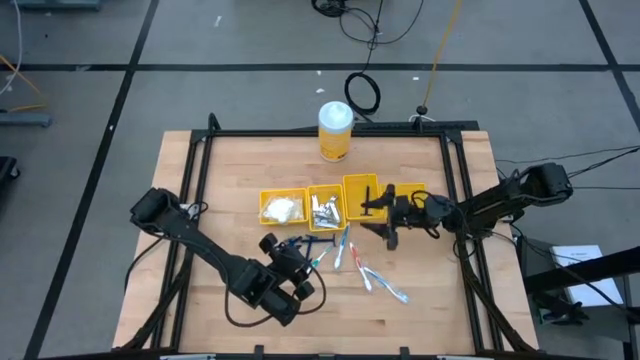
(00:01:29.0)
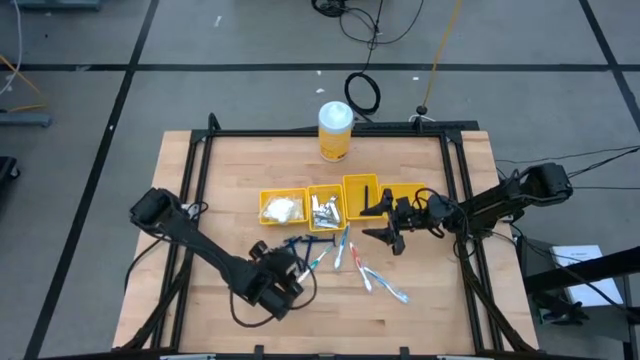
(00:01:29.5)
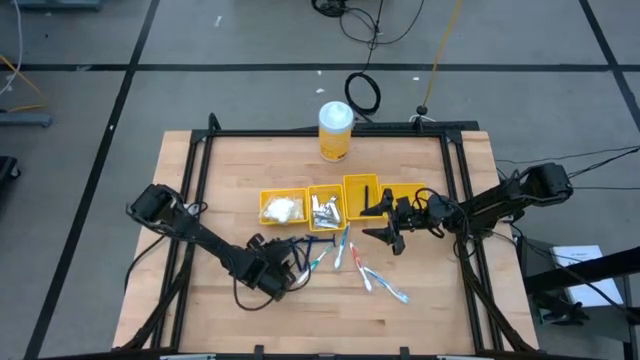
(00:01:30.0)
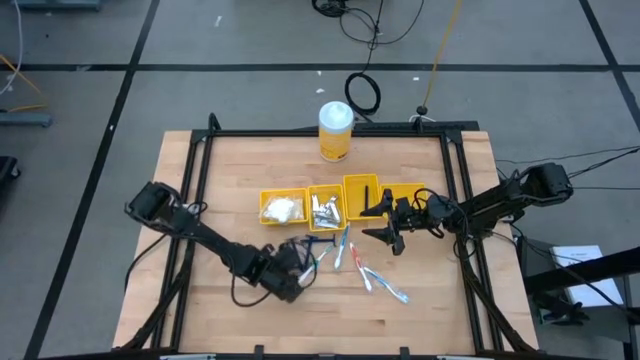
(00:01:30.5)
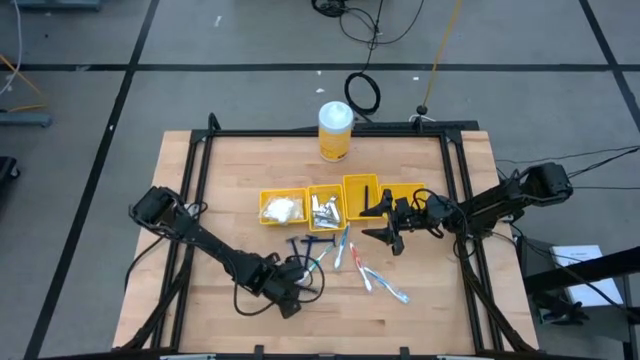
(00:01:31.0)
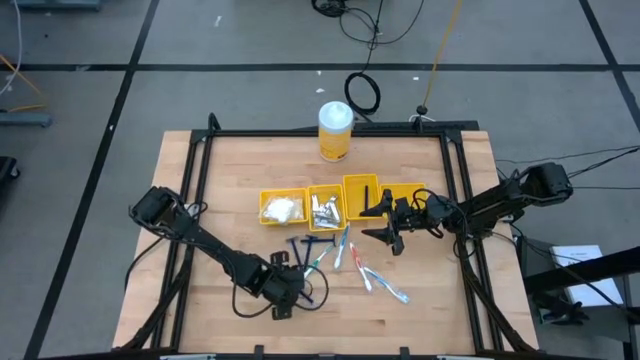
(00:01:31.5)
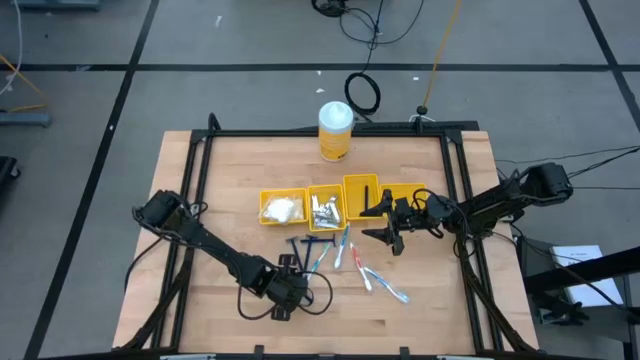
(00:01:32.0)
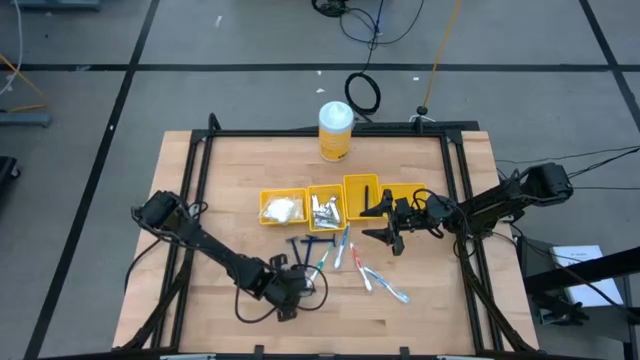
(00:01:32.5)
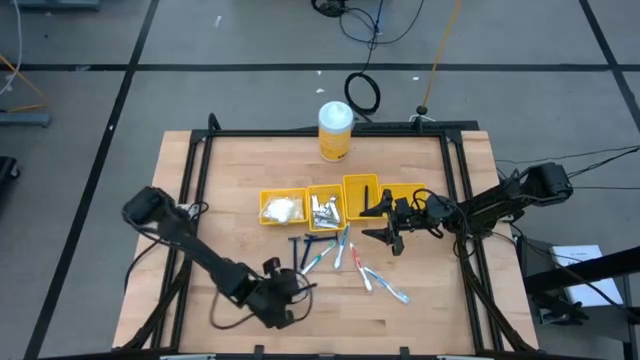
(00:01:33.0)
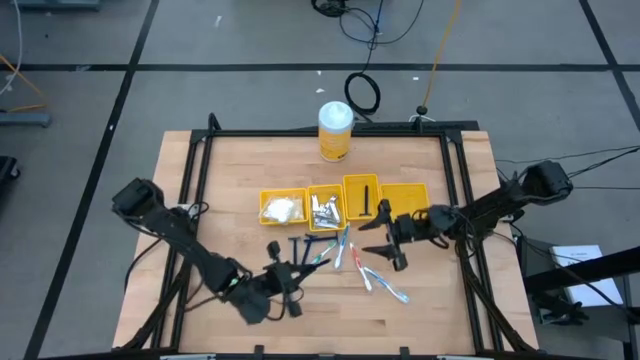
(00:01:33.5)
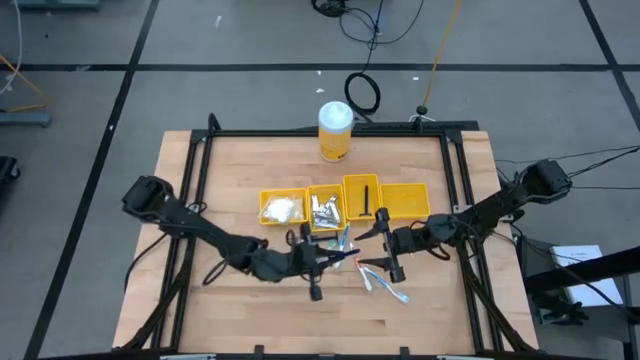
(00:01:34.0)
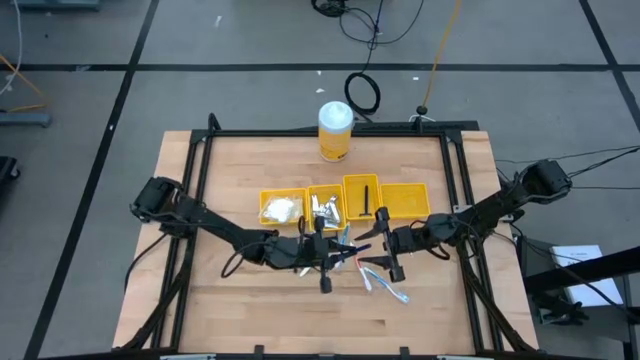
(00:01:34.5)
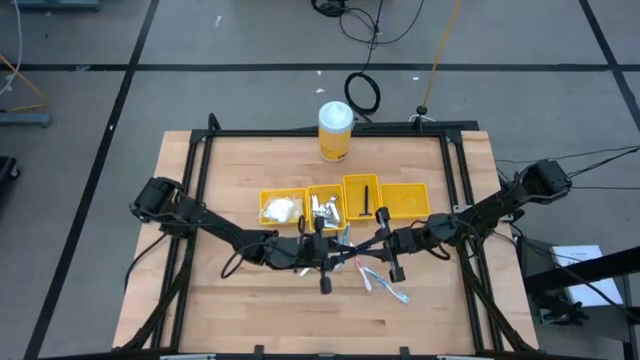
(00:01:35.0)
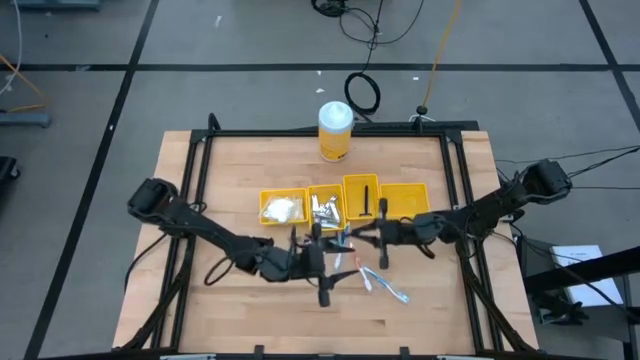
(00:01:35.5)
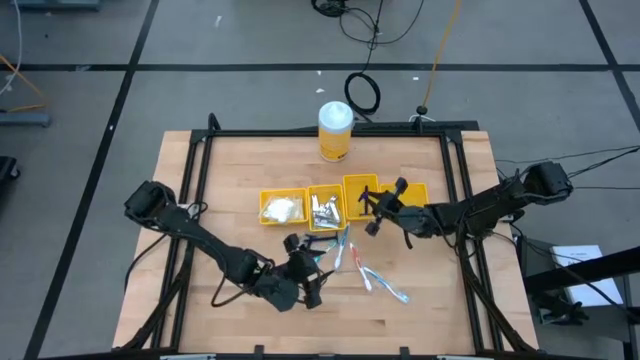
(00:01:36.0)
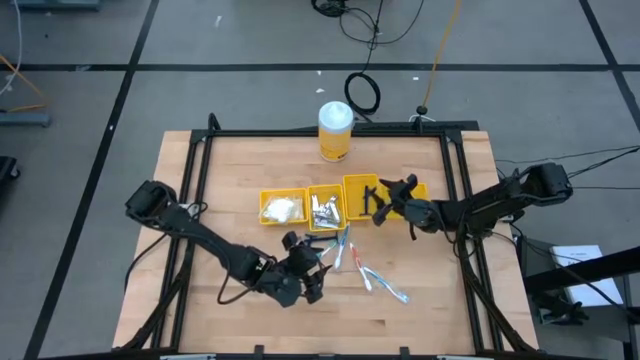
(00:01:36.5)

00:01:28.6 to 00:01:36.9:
Task: Pick & Place Travel size toiletries
Put the blue razor into the middle right yellow bin

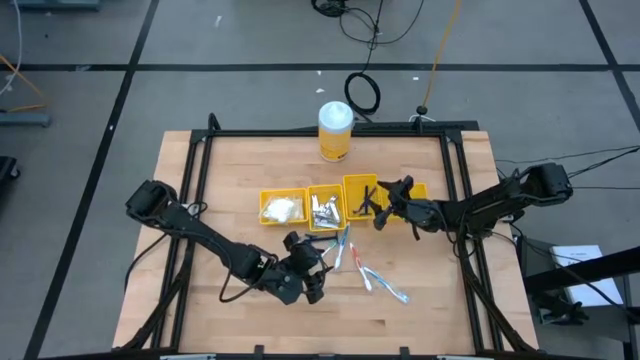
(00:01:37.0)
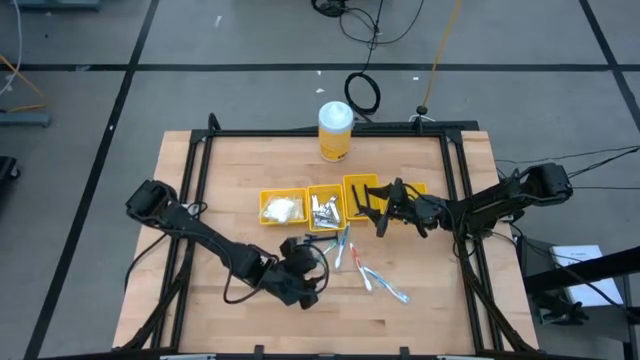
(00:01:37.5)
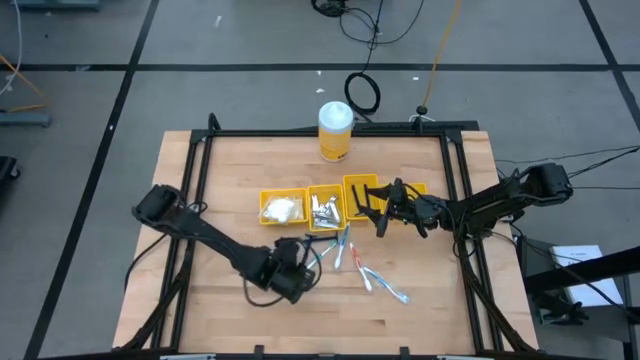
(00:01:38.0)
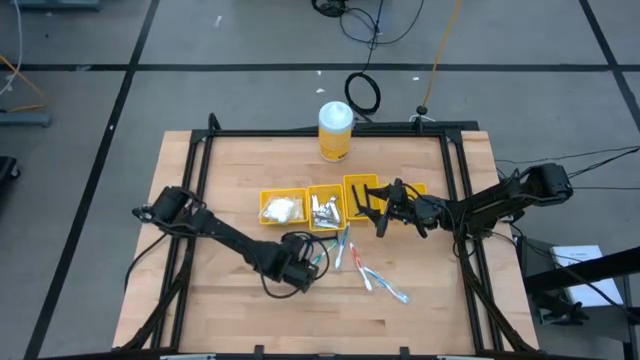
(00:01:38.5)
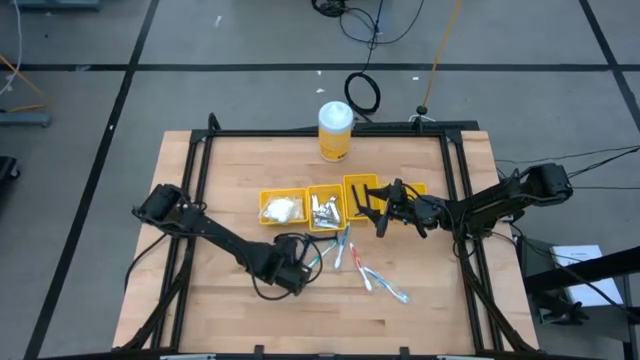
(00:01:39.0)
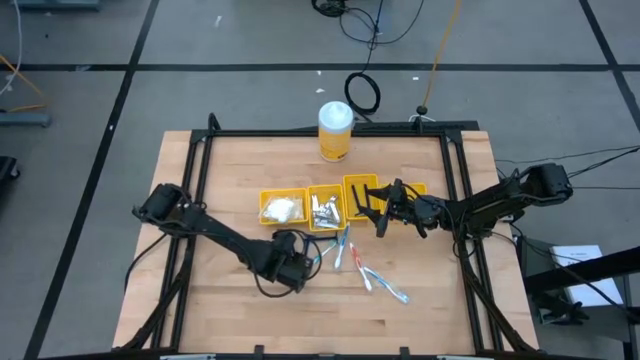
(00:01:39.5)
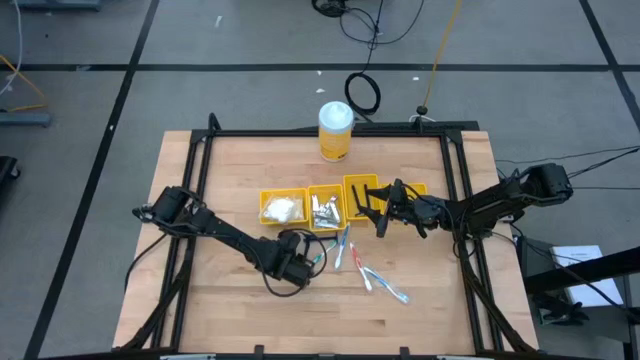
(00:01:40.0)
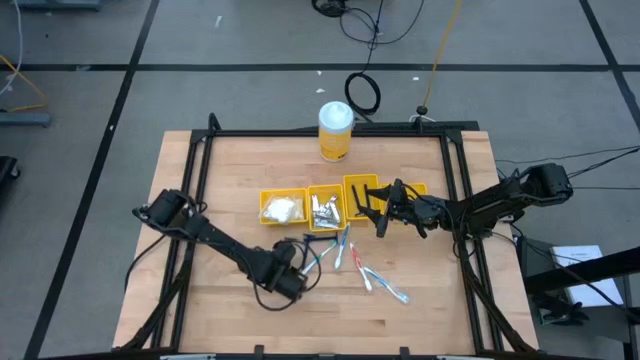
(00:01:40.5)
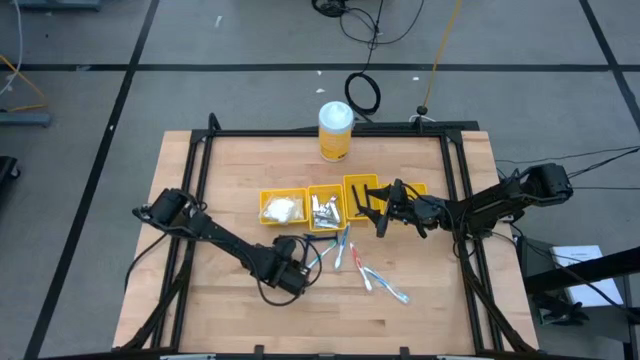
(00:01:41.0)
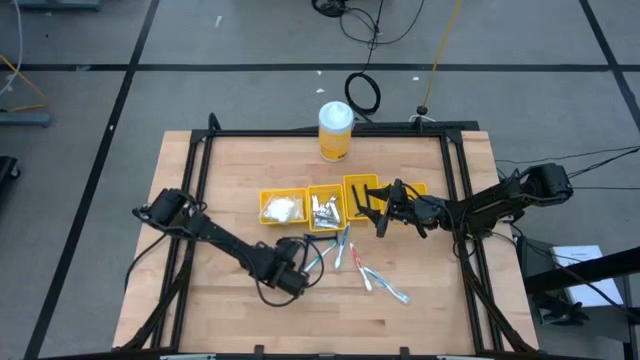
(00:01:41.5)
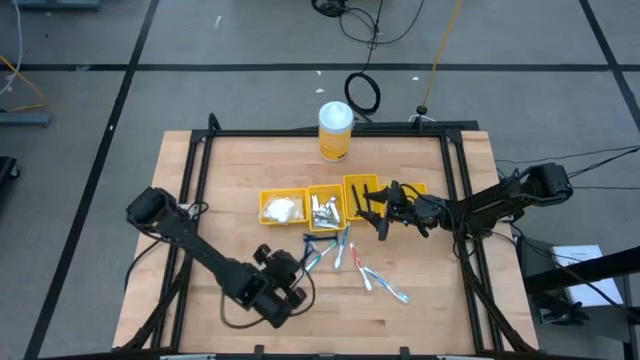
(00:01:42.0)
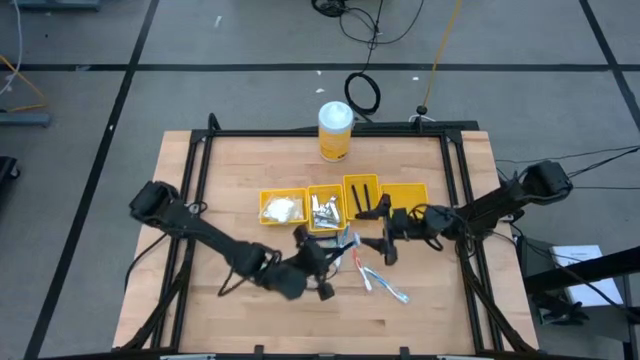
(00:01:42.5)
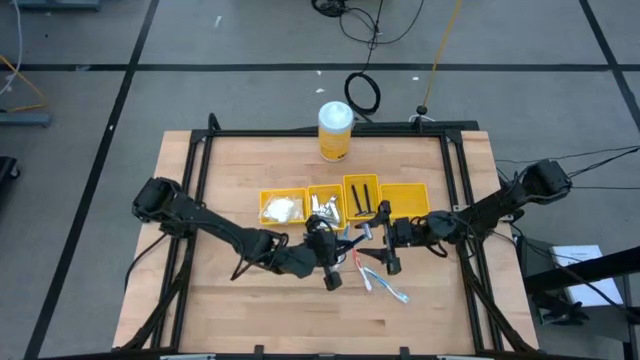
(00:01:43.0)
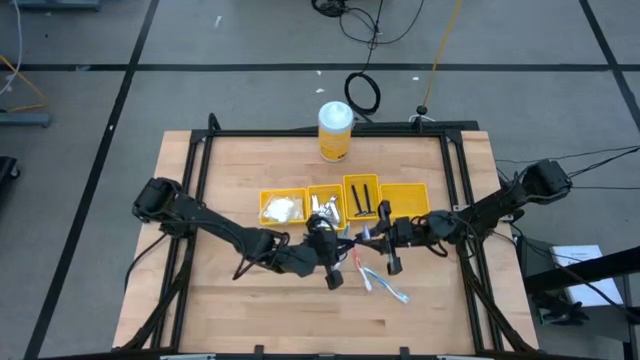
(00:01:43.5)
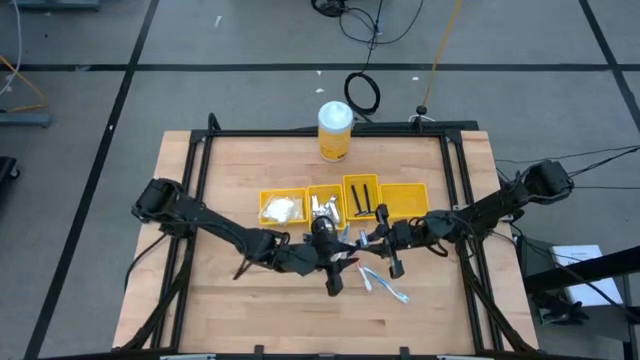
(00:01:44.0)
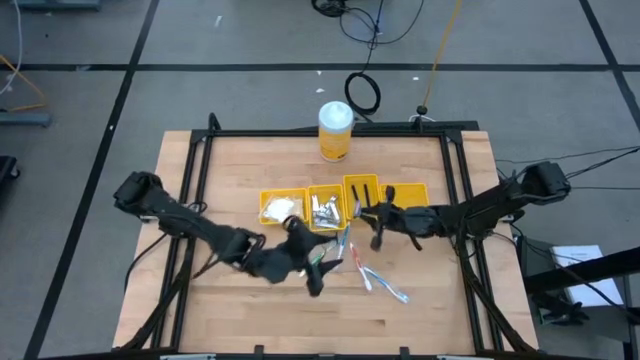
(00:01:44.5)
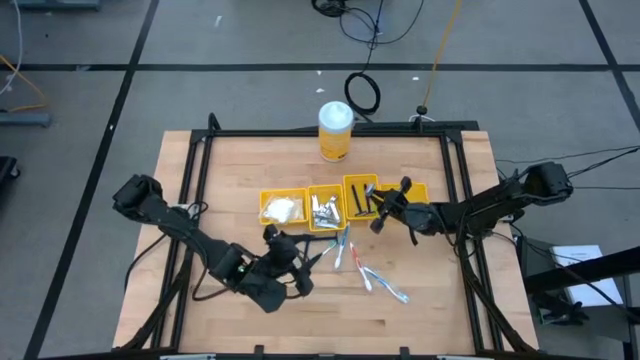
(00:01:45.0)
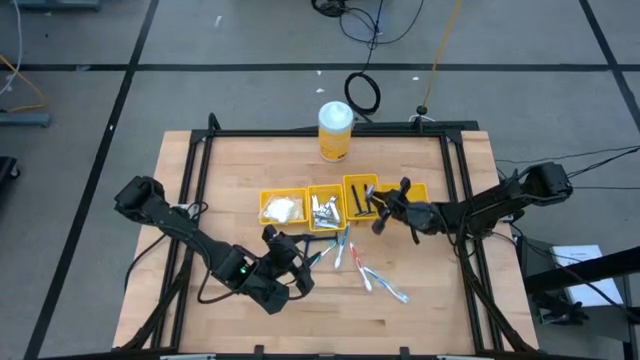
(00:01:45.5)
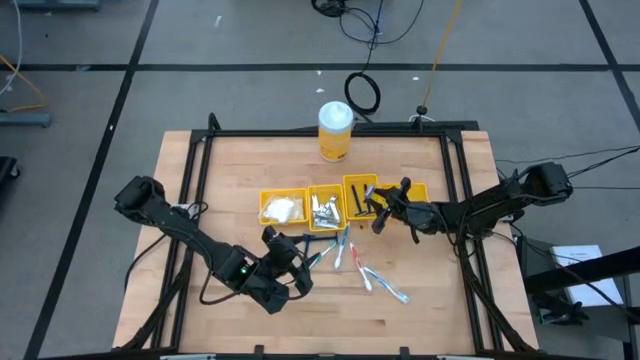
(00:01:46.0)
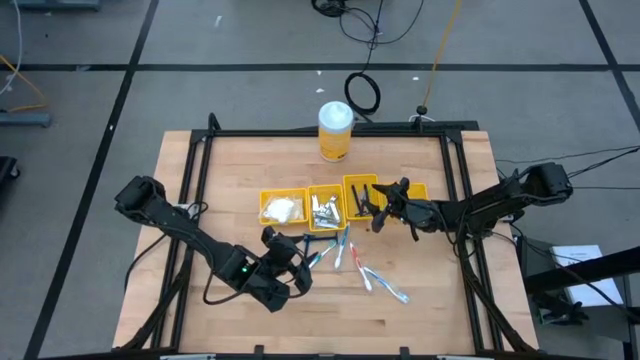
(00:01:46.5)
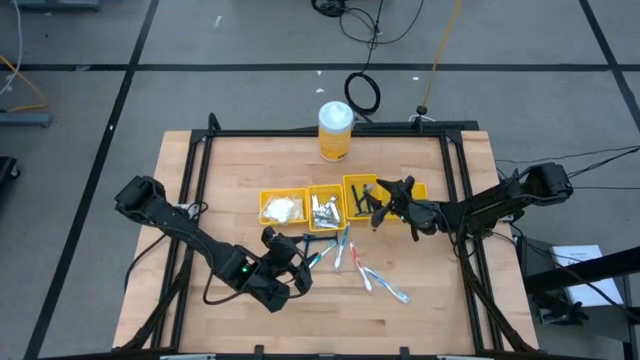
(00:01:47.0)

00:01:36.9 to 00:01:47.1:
Put the left blue razor into the middle right yellow bin

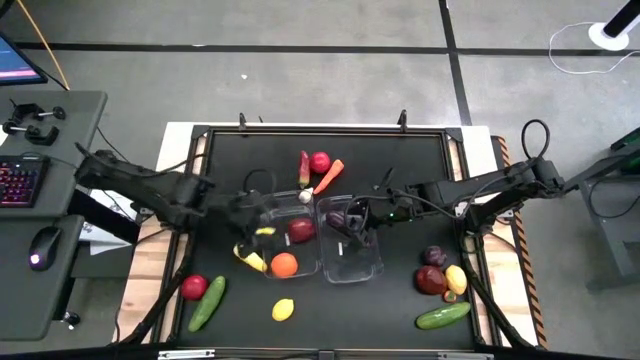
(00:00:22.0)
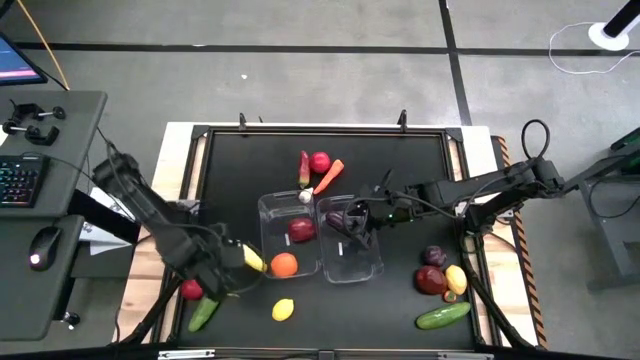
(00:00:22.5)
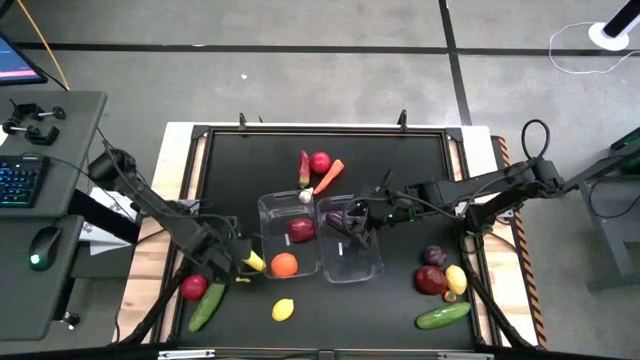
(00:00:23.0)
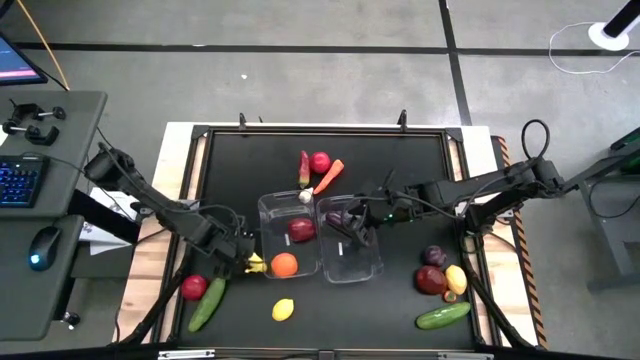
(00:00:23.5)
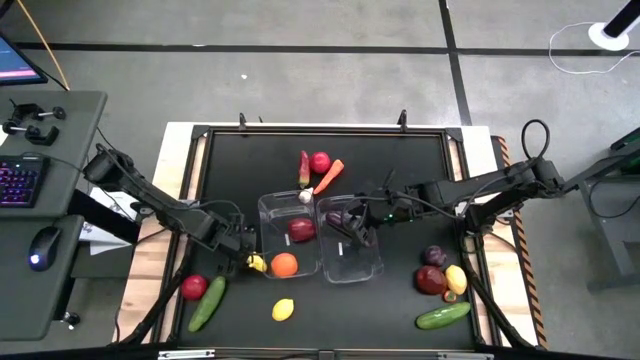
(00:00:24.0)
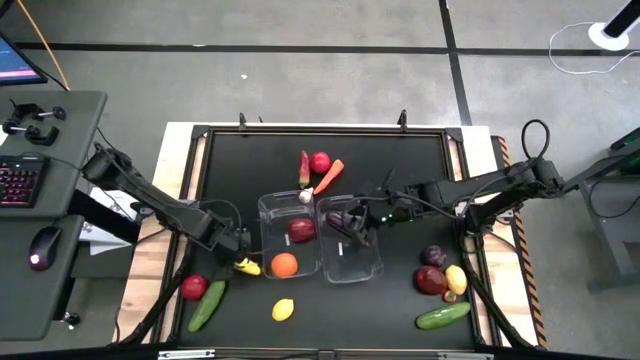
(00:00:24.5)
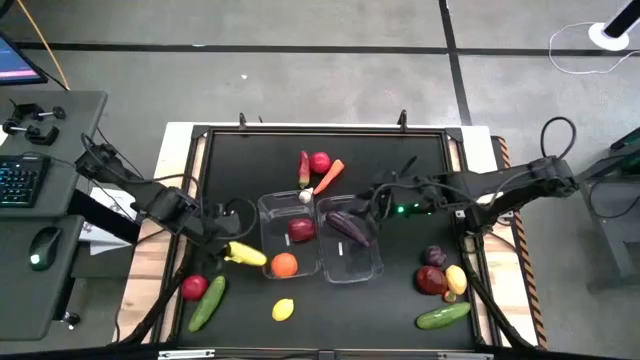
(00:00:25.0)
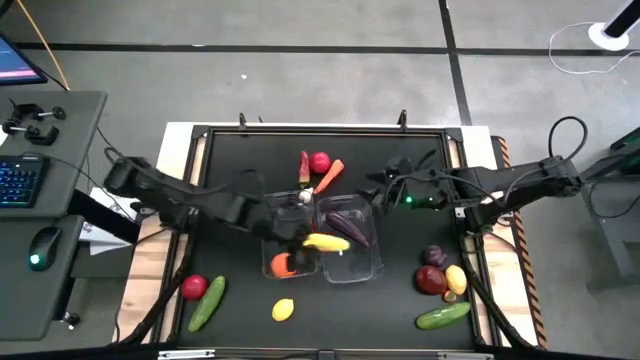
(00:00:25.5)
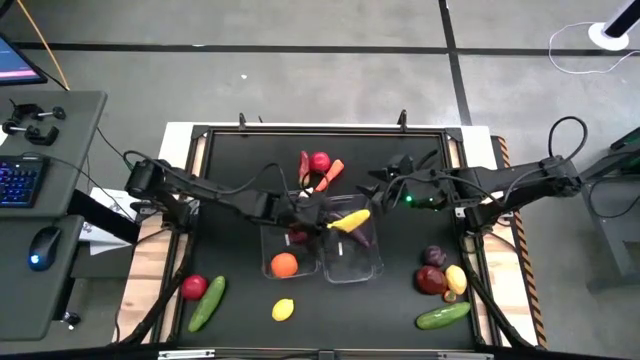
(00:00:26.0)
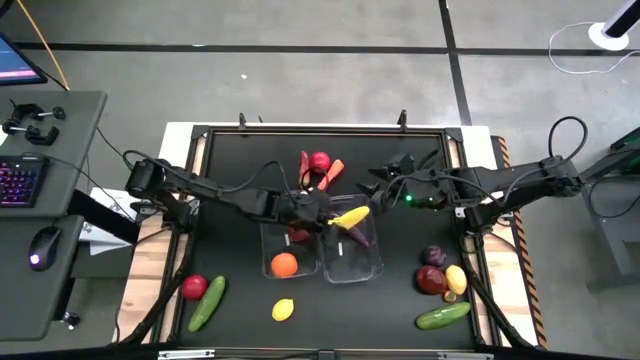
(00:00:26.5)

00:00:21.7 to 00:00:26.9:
Task: Sort produce into baskets
Put the corn into the right transparent bin
